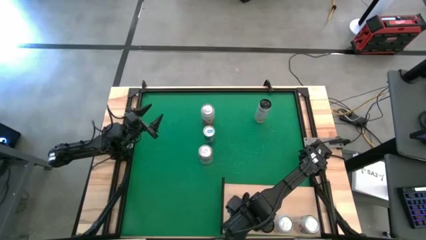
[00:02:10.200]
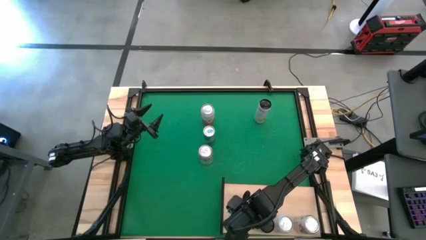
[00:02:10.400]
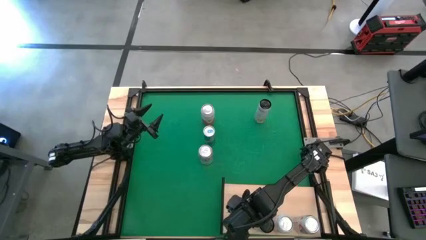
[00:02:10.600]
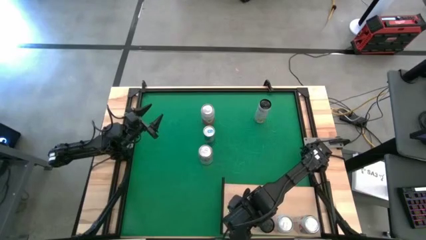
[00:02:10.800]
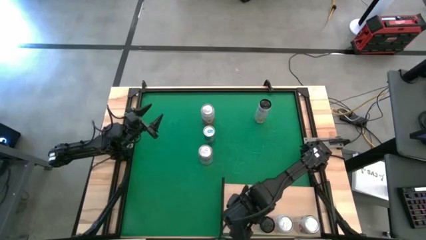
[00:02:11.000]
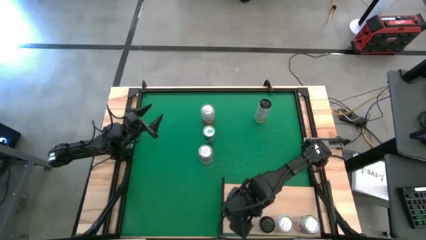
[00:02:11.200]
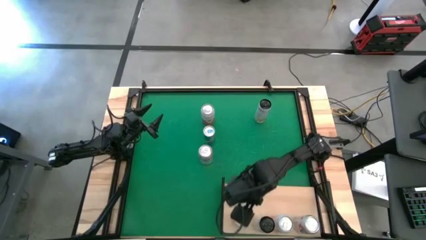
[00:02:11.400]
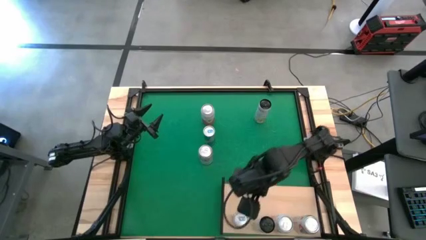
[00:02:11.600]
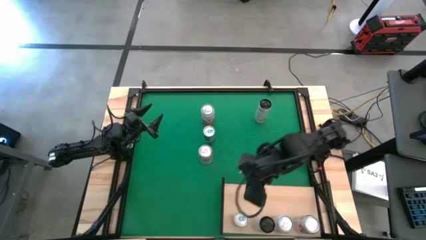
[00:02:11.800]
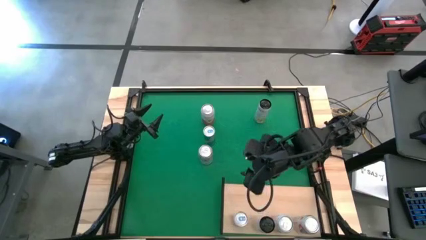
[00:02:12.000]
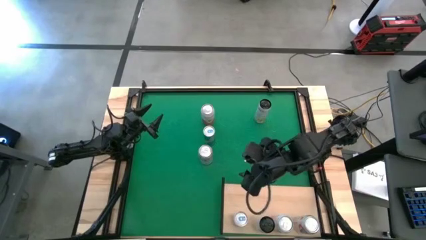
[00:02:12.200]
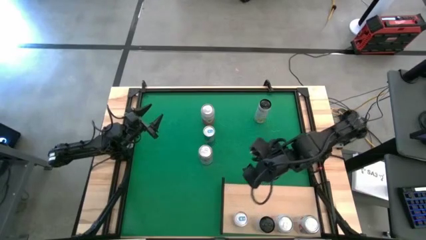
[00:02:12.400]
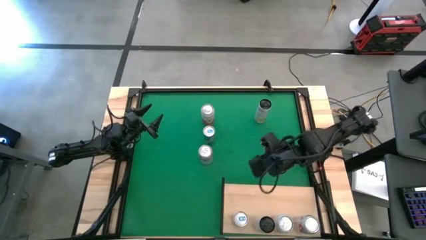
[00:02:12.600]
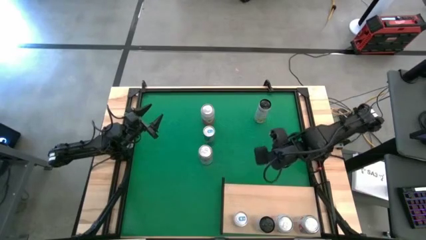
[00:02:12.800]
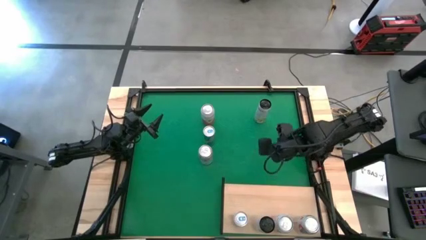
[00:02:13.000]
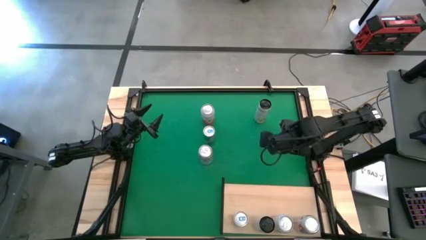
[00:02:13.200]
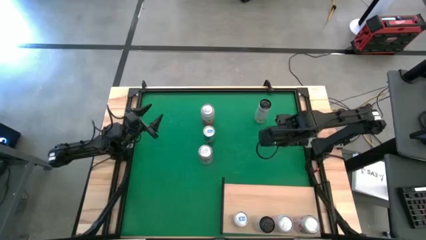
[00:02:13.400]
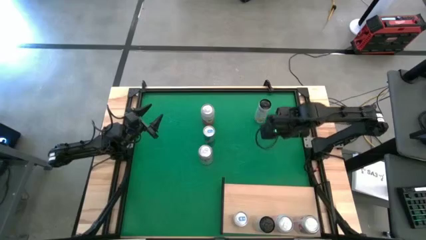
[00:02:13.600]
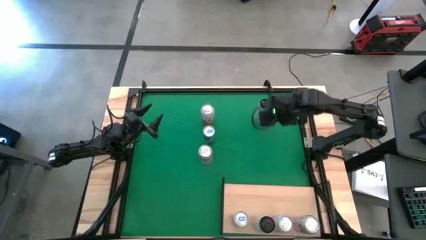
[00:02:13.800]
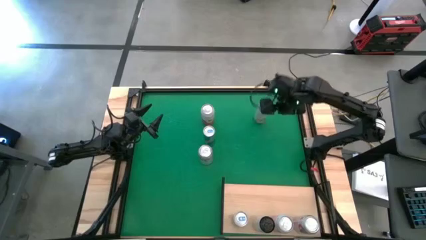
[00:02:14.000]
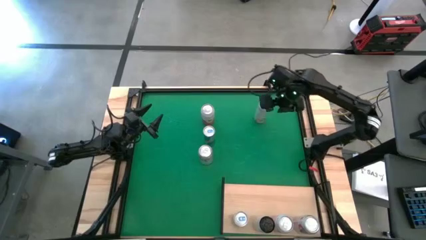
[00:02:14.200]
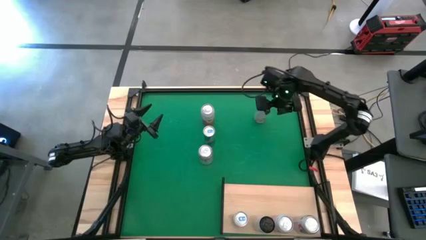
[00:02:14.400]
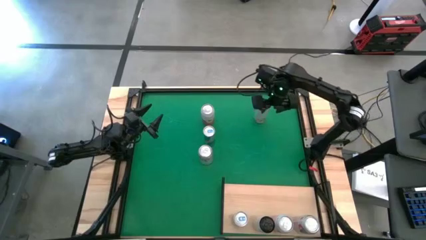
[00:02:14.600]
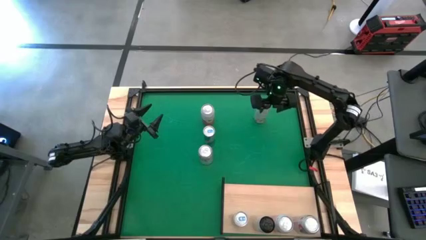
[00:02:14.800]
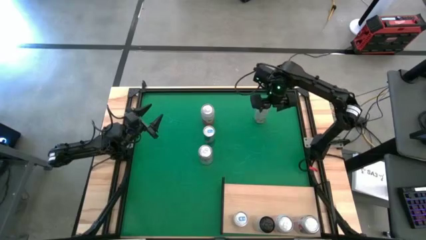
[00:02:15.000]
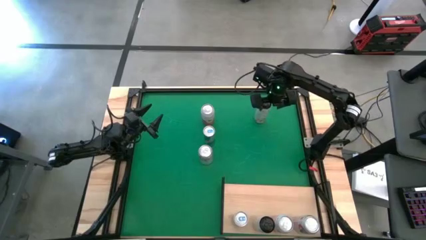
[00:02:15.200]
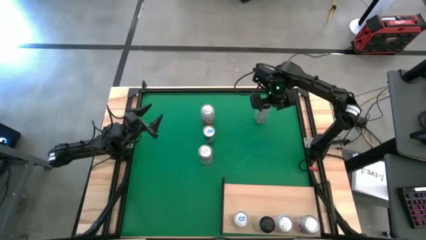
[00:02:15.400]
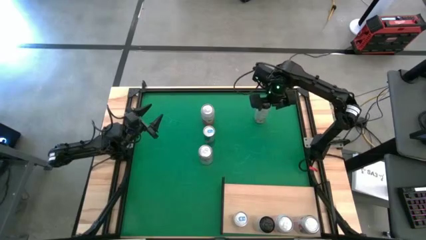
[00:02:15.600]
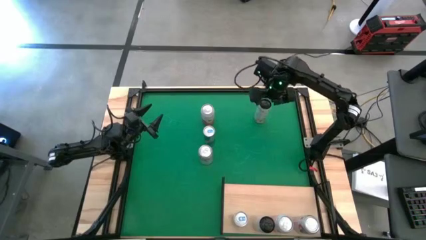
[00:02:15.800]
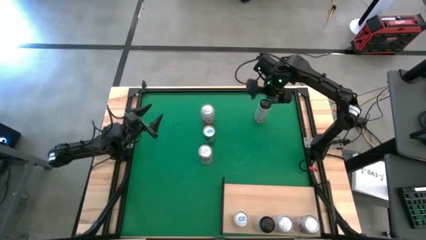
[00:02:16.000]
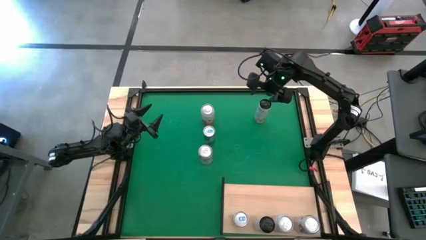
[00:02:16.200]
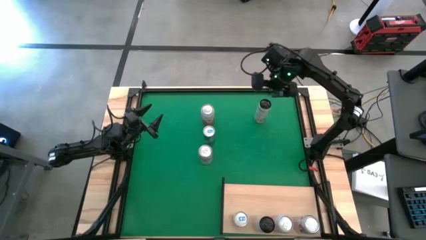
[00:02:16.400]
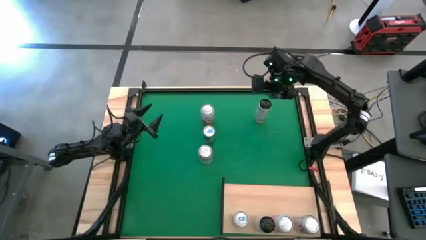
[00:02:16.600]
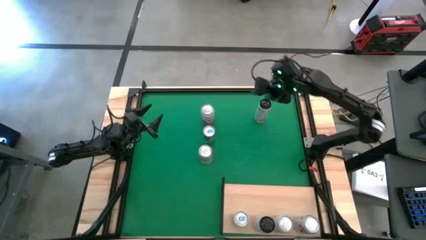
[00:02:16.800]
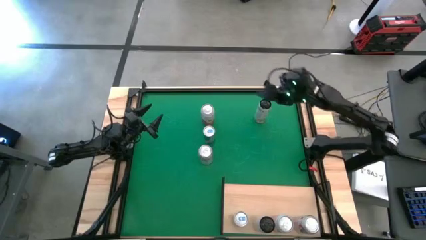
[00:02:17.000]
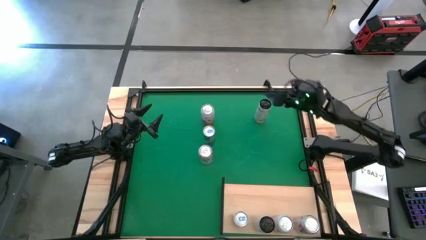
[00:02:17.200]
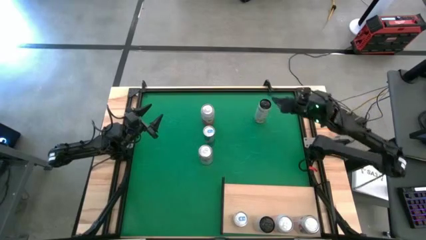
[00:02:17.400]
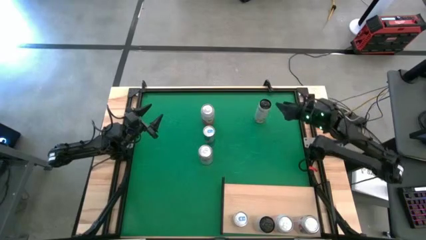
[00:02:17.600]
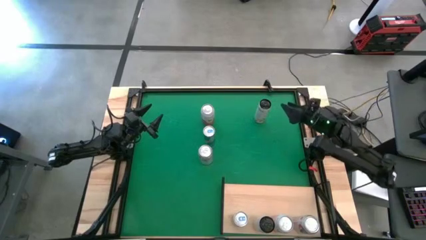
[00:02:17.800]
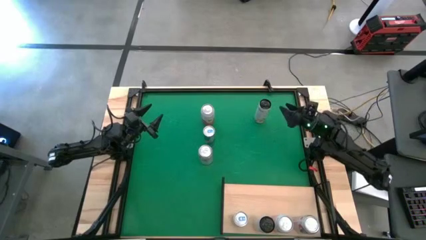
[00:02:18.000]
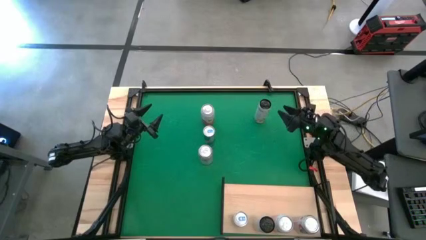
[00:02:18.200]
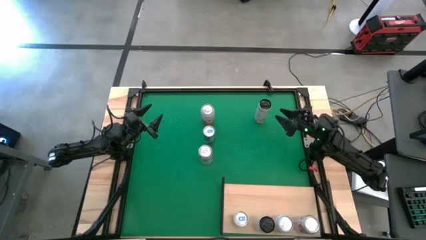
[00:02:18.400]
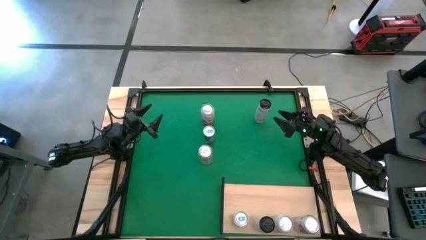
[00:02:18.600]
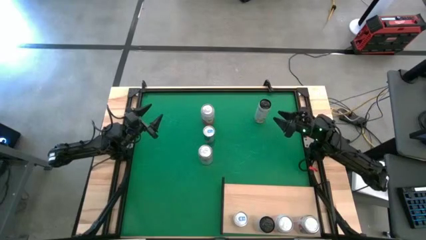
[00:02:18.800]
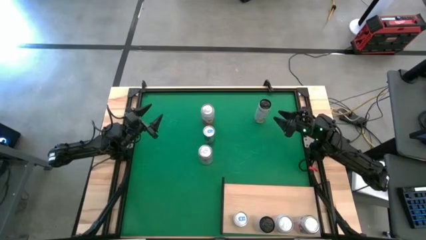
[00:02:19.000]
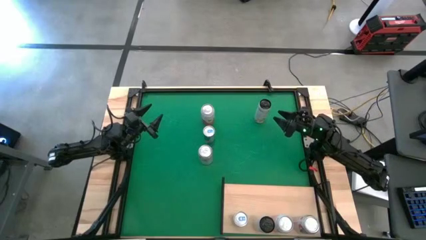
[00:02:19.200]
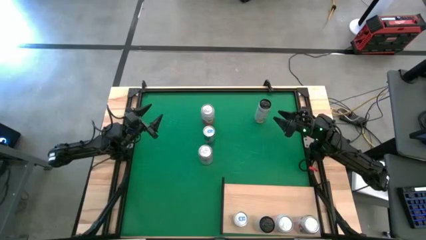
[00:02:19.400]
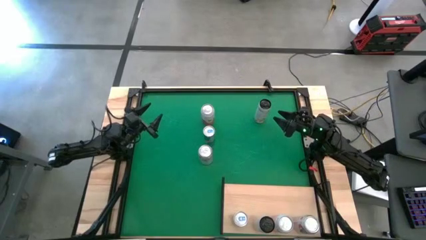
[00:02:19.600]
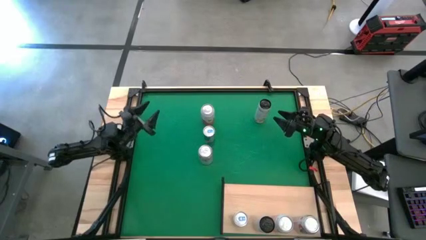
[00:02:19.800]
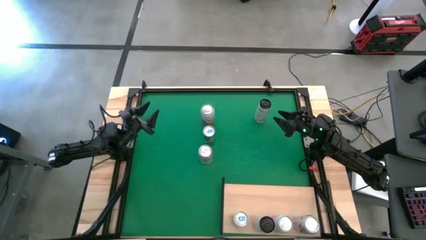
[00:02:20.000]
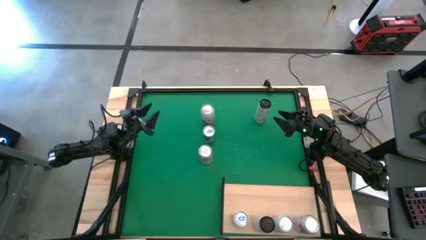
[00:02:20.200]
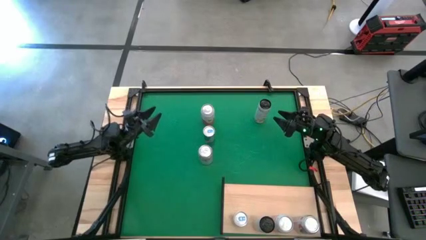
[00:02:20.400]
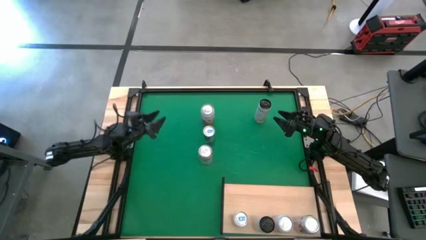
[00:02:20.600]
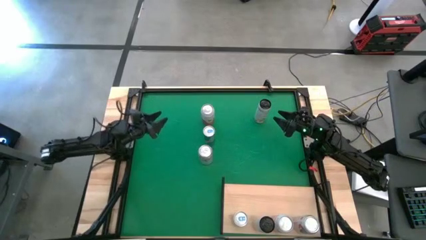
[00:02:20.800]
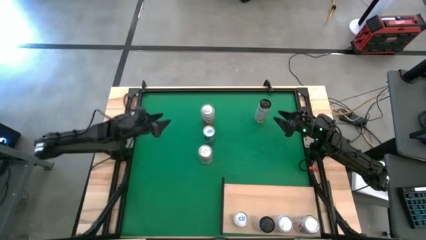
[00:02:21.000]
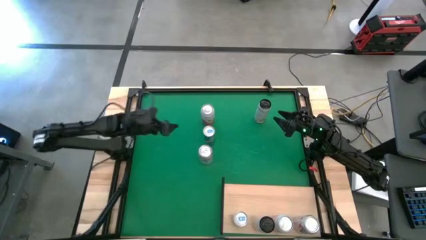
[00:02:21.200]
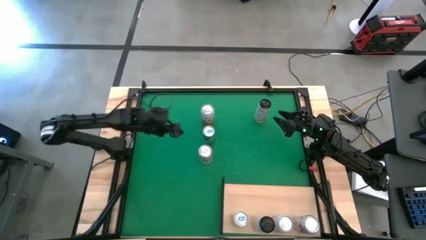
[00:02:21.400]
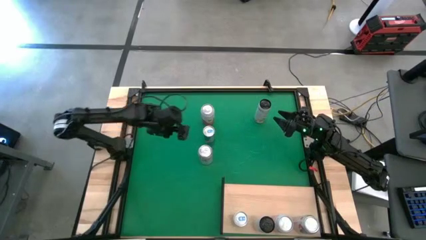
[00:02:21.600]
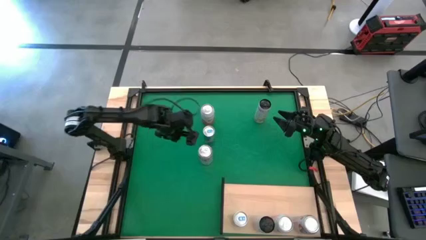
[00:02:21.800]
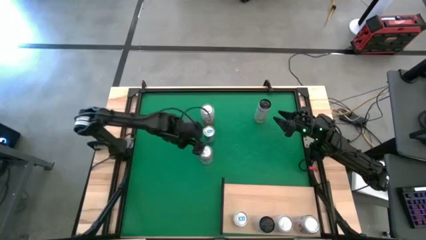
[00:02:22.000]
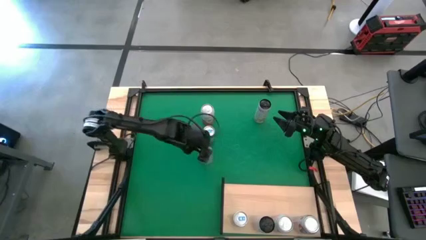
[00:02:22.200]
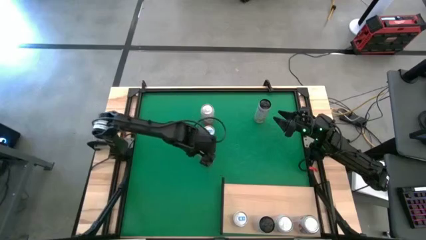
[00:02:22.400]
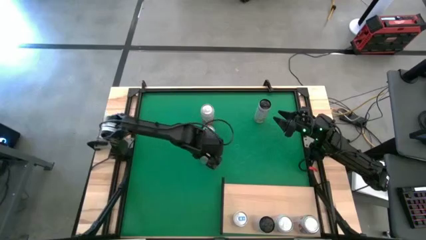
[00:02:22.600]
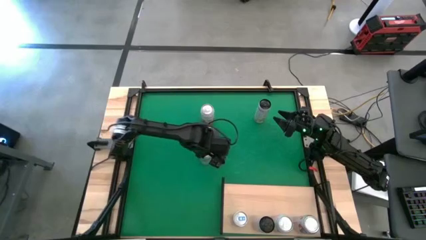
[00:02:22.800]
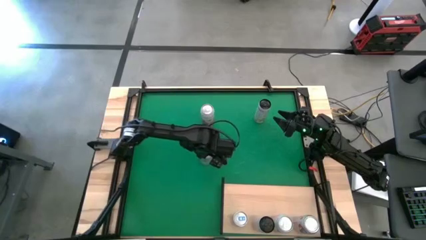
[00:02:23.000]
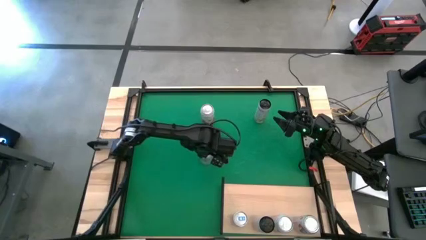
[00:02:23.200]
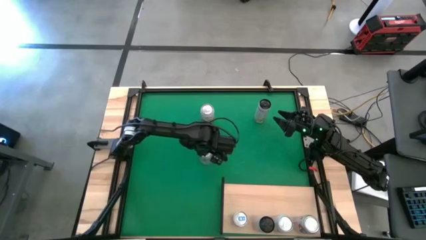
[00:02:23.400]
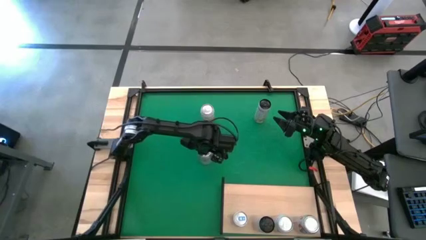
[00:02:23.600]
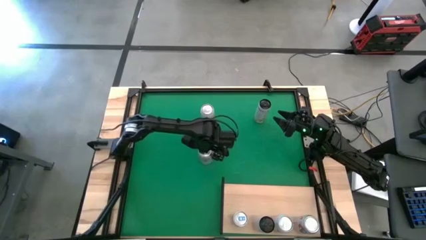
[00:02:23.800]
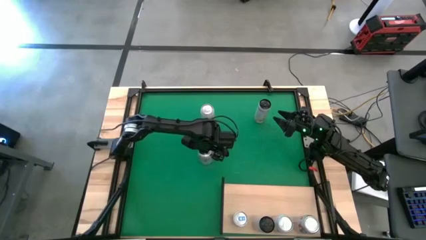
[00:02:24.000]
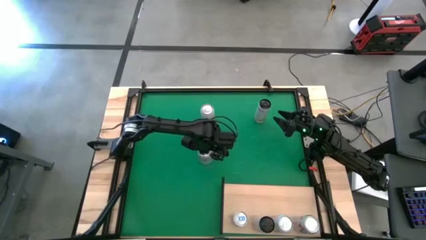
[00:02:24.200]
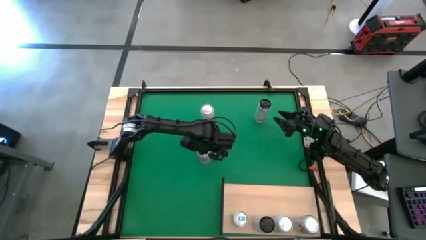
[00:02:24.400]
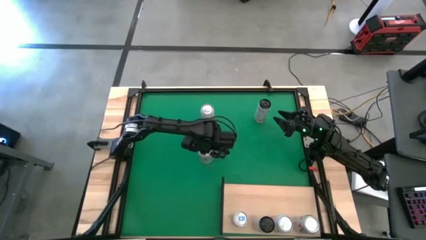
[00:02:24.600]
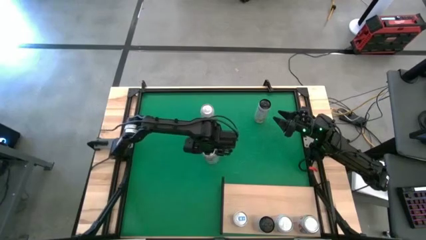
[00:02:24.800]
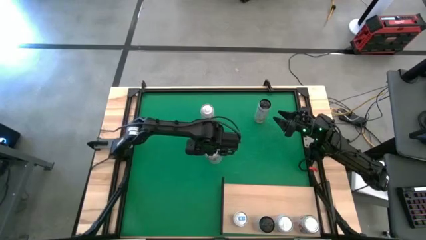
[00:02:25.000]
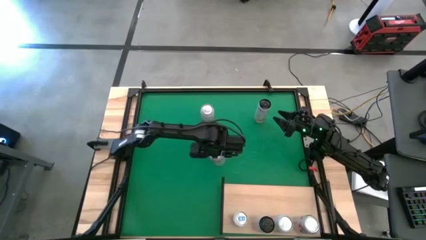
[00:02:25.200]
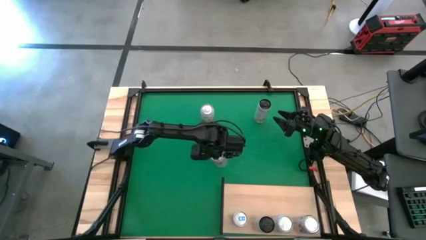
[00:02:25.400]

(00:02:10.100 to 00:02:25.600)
Task: Place canned beverage on shelf
Move the red-silver soda can near the shelf
